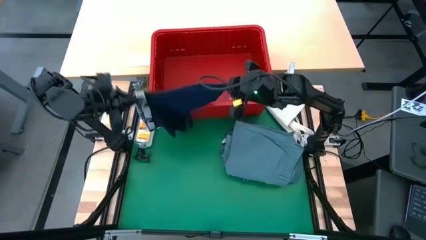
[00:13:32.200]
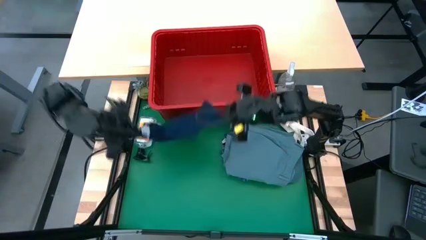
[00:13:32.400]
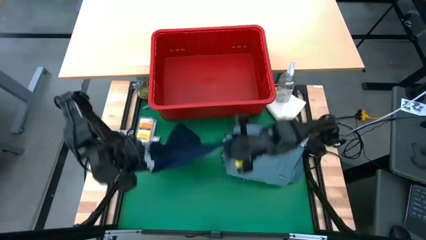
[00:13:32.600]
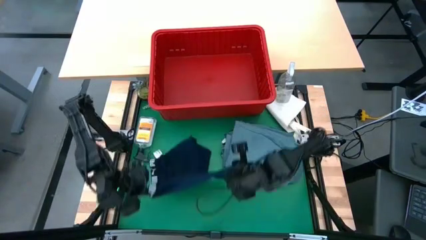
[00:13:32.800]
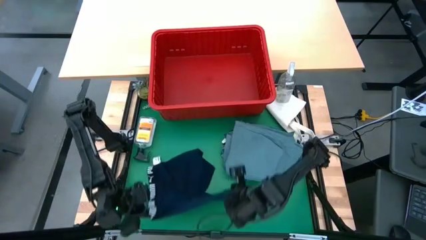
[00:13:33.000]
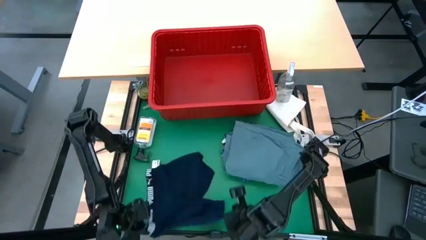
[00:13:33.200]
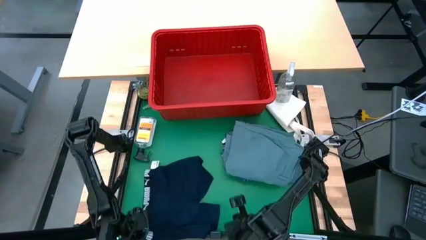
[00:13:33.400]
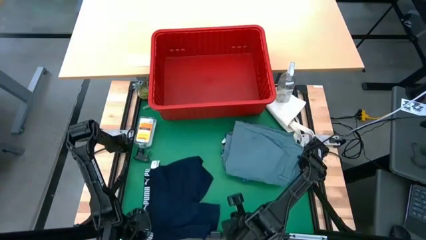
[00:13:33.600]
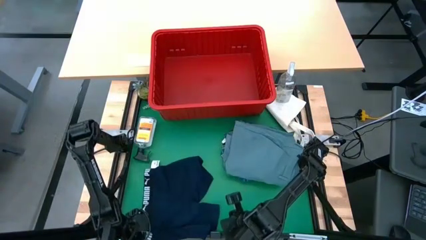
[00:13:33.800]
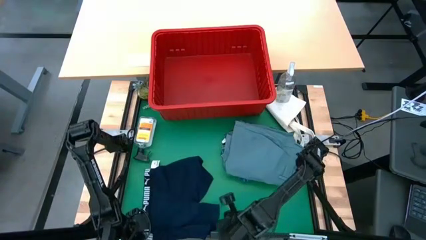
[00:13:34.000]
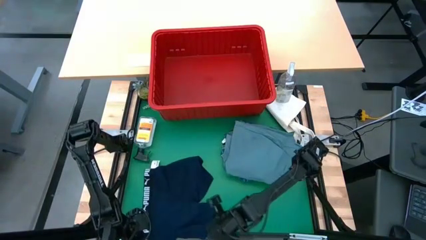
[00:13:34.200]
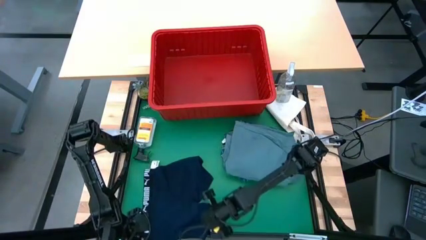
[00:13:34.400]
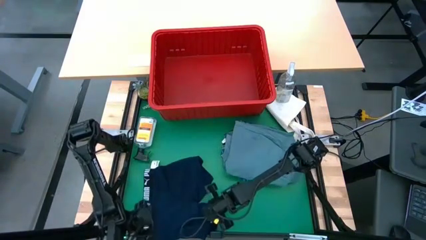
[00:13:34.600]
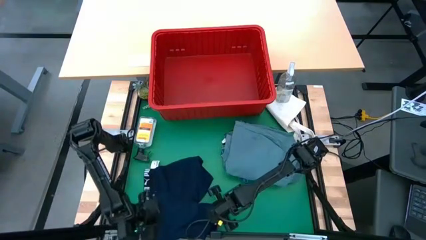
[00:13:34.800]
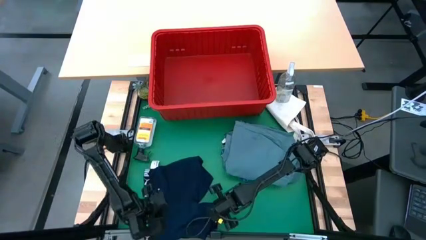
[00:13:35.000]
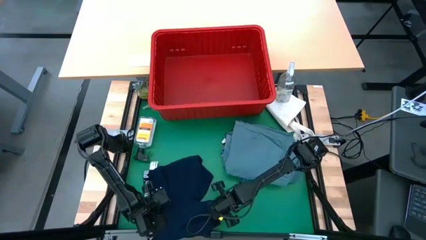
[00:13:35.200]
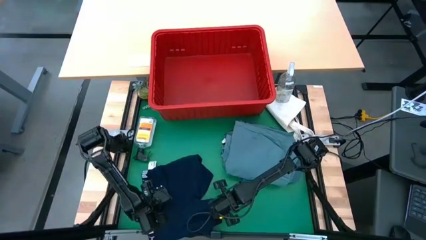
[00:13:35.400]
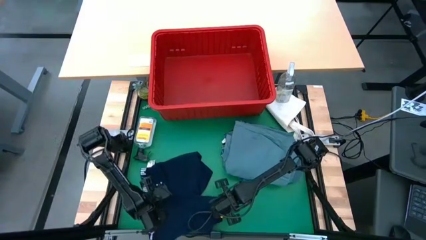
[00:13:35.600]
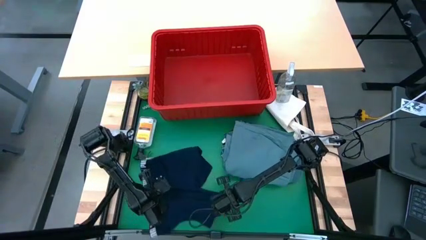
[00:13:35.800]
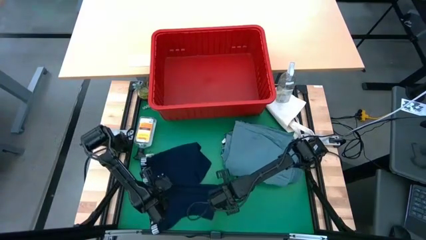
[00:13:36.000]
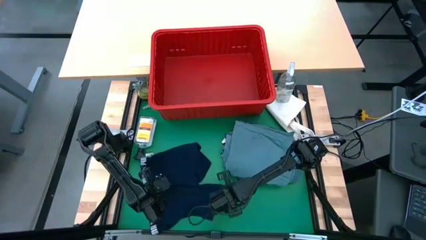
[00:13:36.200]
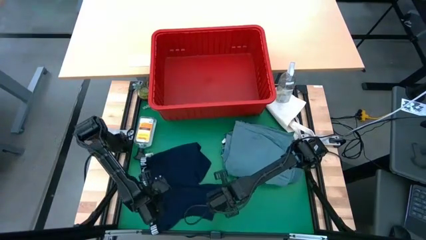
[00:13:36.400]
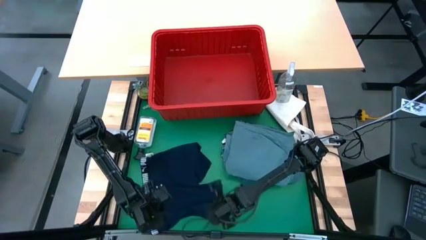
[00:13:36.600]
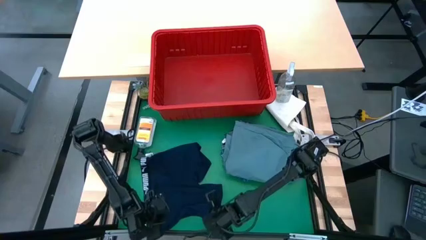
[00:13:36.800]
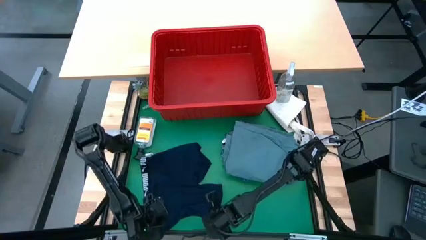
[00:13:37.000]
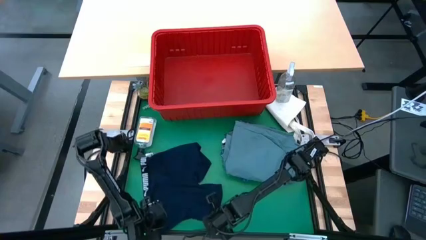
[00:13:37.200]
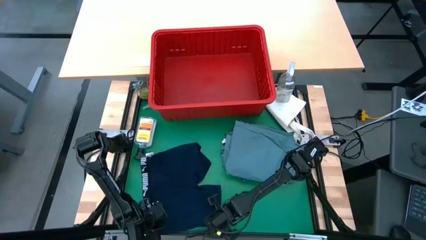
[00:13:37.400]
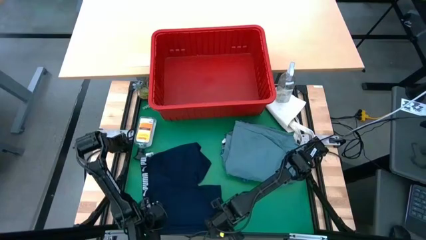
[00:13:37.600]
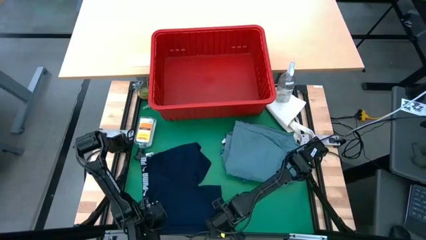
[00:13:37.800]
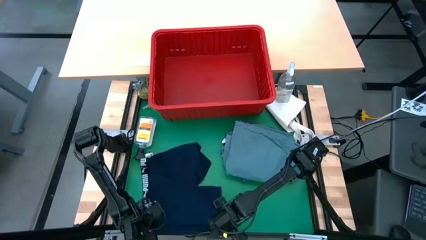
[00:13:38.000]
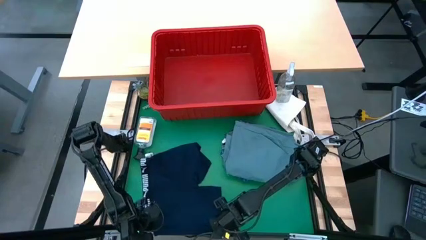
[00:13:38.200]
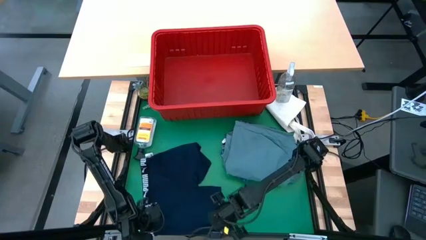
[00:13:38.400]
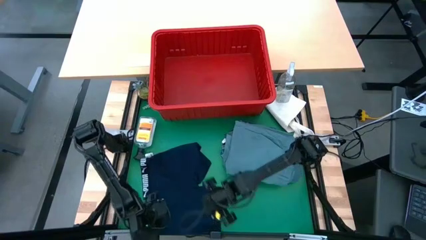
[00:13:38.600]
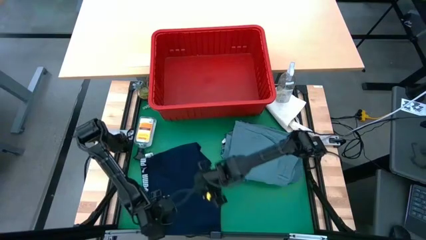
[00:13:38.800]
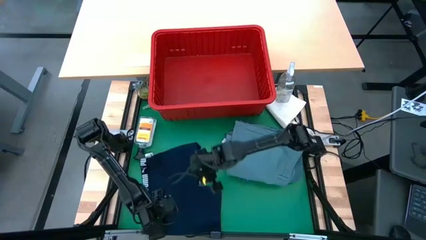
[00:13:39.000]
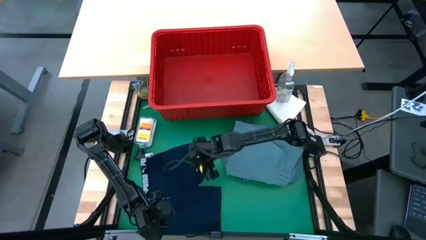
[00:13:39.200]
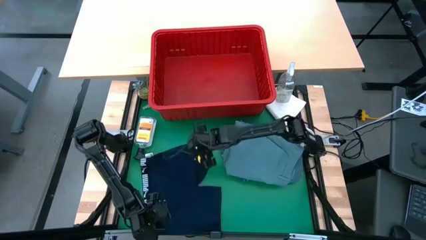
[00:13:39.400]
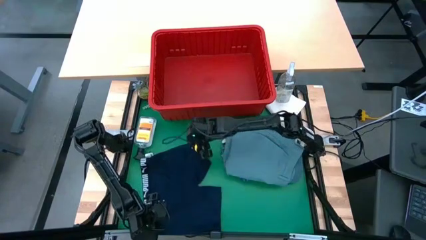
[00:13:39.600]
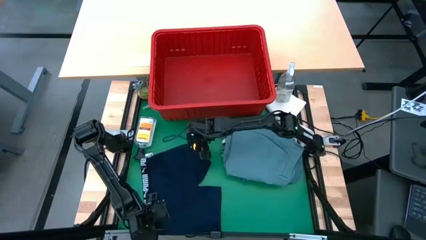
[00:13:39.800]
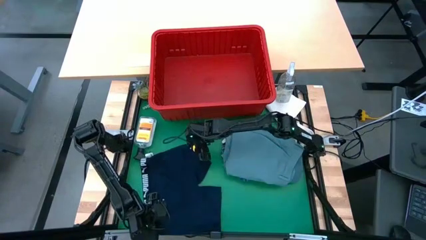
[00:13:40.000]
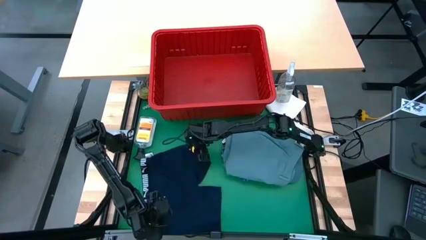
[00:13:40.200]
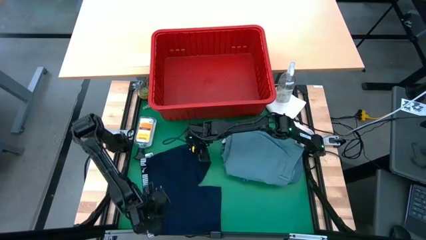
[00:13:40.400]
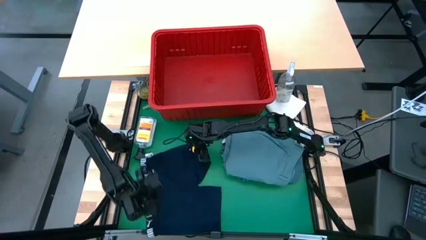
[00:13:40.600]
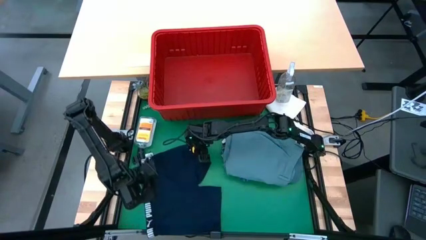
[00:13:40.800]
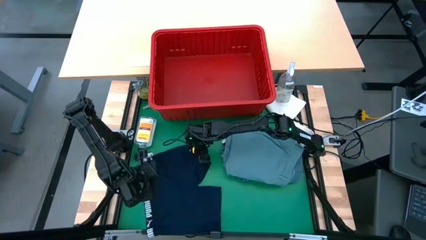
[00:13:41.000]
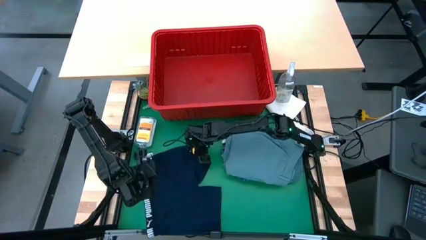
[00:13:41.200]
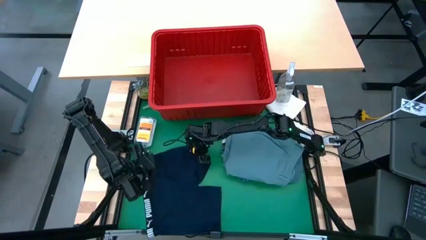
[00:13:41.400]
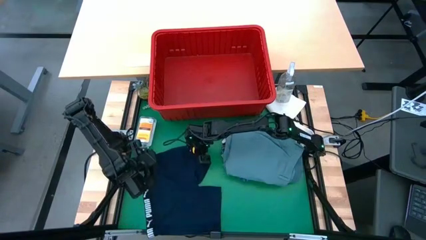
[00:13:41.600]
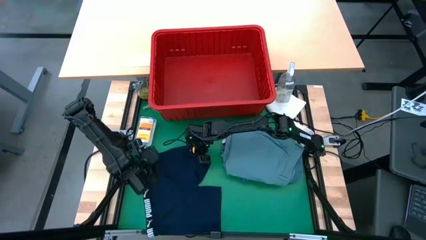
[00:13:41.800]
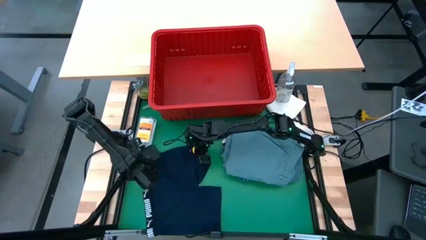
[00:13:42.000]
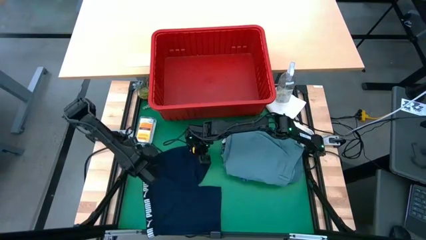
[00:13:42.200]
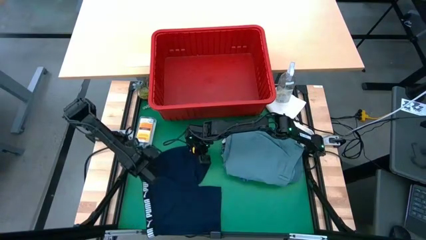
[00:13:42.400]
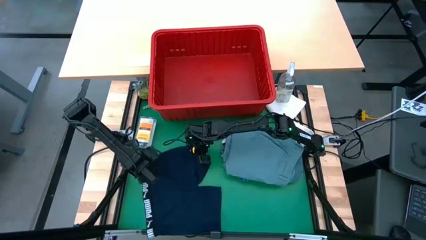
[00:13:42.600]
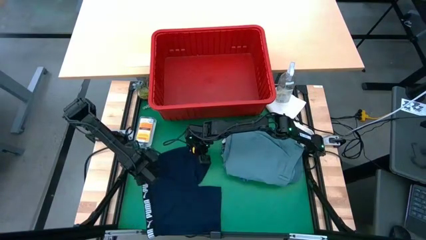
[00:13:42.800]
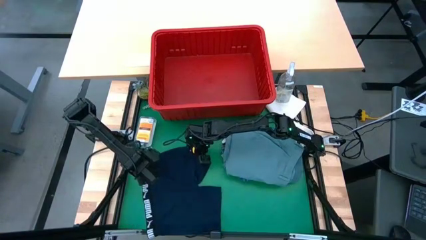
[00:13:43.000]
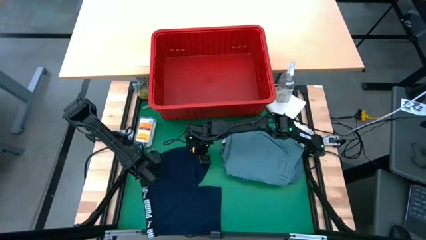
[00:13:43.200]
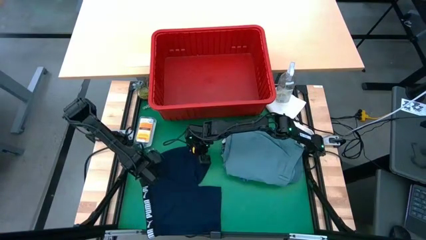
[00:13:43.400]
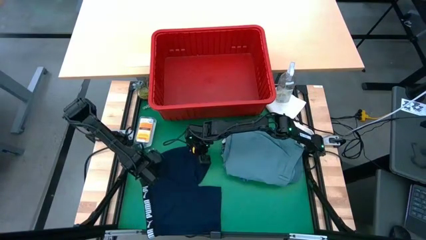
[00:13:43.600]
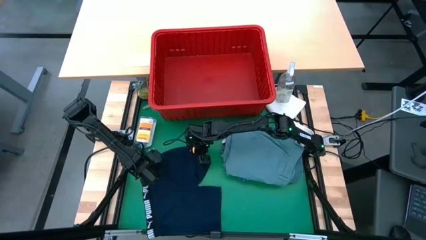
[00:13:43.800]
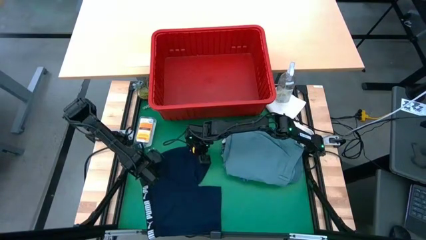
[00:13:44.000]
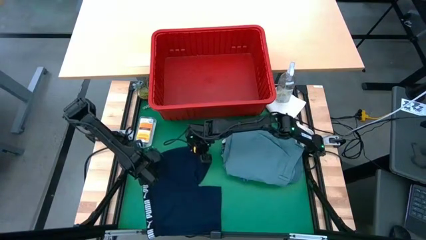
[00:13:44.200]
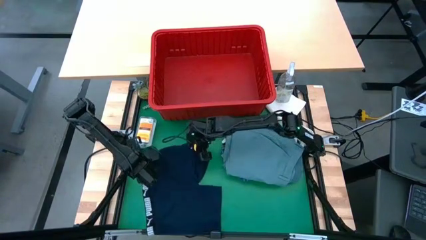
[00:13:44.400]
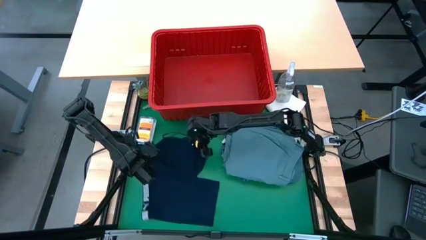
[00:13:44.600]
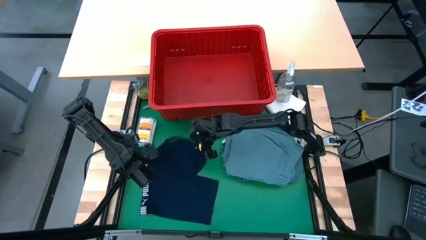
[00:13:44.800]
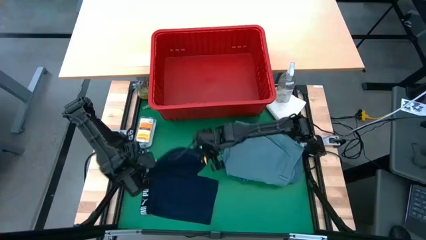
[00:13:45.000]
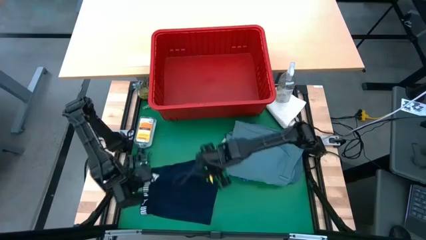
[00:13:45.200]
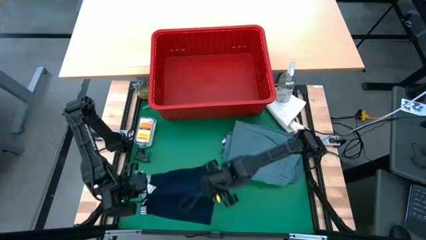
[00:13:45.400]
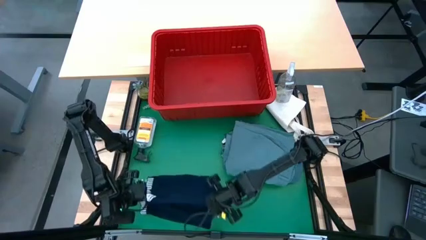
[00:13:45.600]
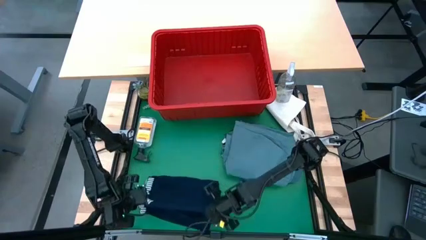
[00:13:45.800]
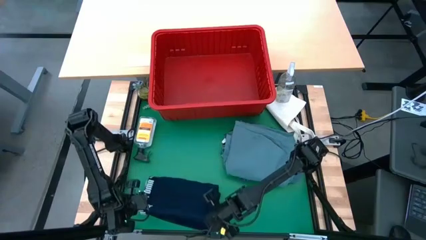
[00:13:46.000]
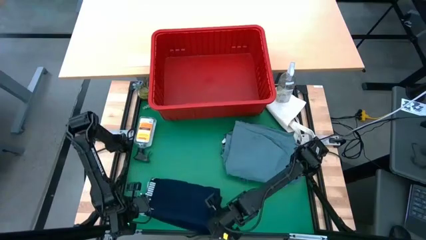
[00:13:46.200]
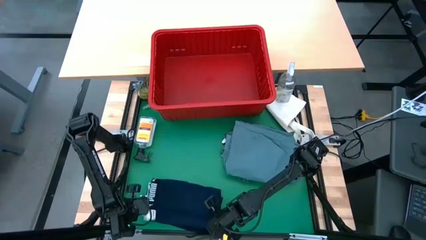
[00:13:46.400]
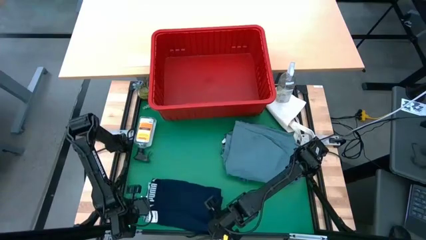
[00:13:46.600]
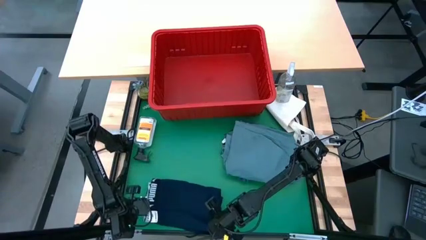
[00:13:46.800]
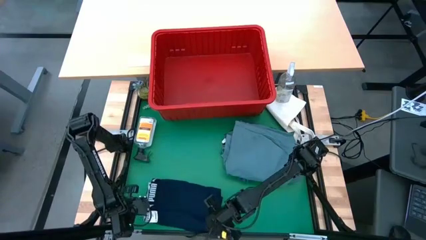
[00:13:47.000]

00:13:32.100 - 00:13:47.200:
Task: Fold Laundry from Bin
Fold the dark blue underwear shorts
